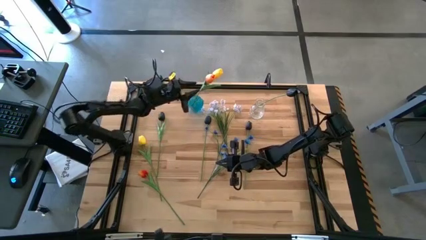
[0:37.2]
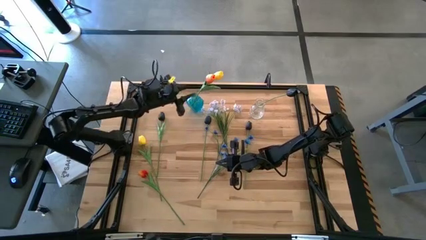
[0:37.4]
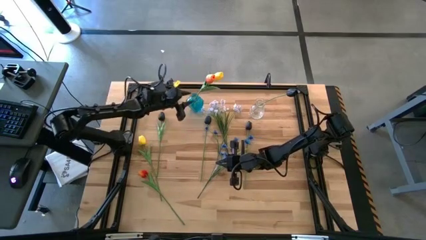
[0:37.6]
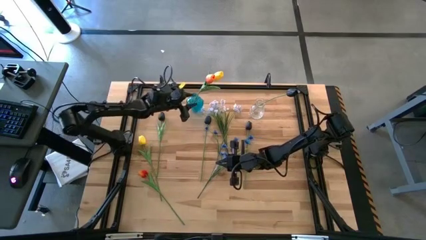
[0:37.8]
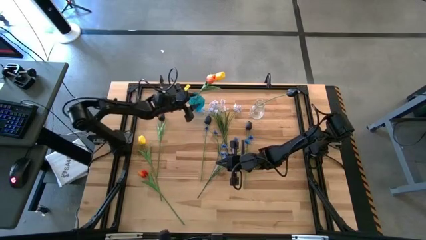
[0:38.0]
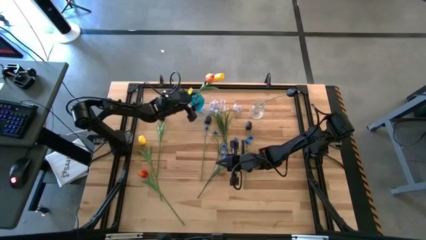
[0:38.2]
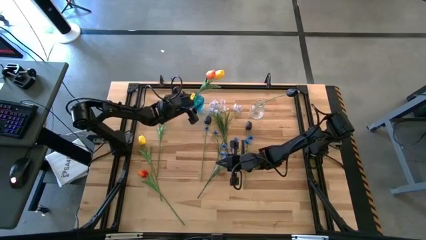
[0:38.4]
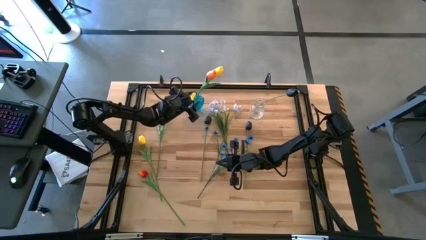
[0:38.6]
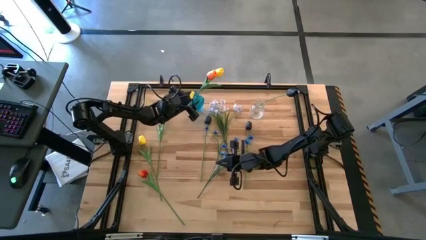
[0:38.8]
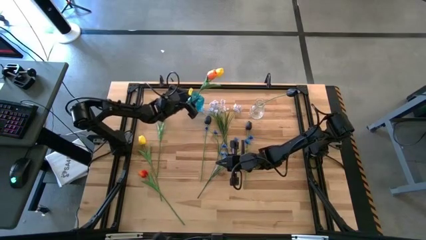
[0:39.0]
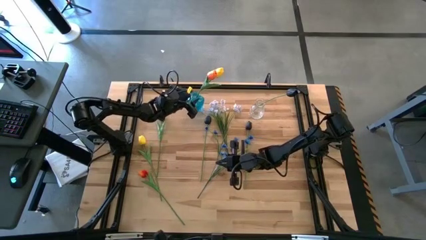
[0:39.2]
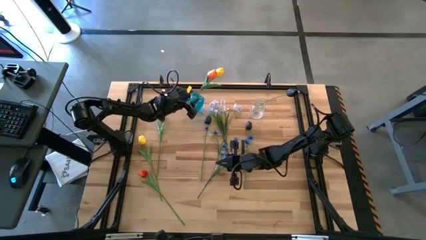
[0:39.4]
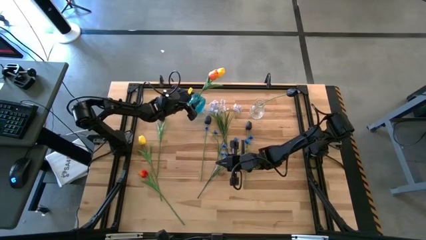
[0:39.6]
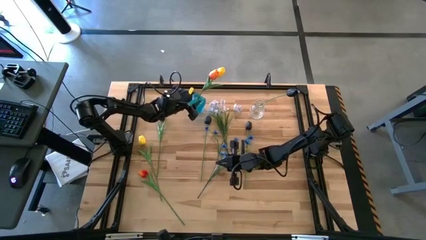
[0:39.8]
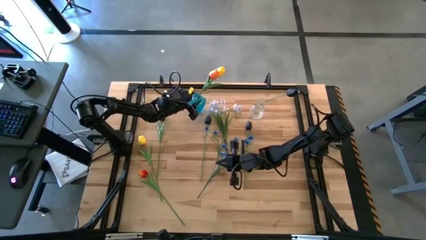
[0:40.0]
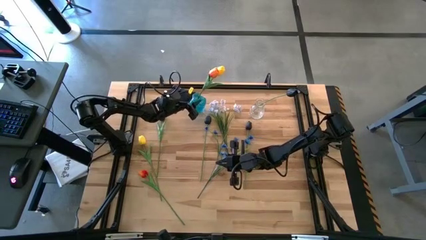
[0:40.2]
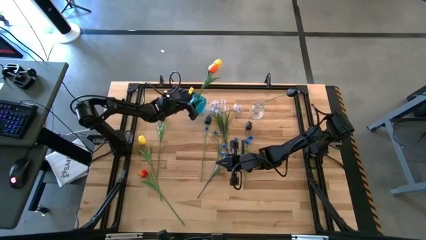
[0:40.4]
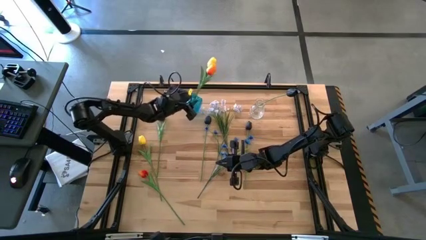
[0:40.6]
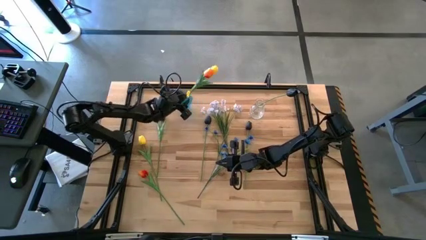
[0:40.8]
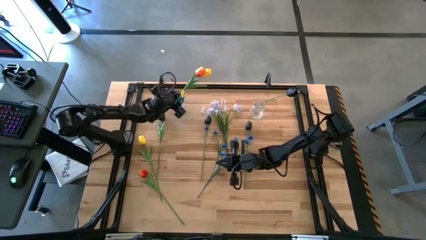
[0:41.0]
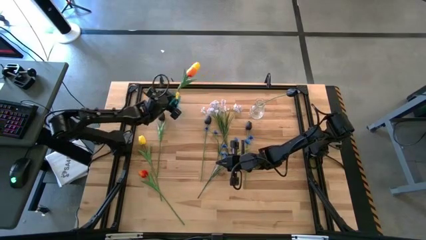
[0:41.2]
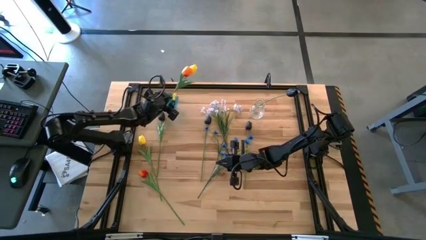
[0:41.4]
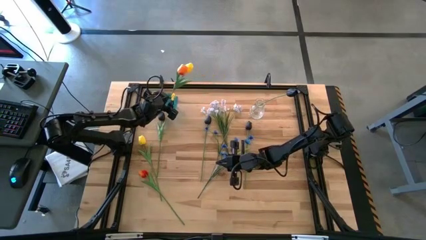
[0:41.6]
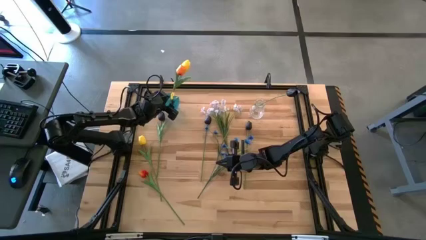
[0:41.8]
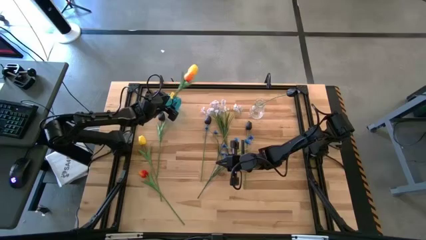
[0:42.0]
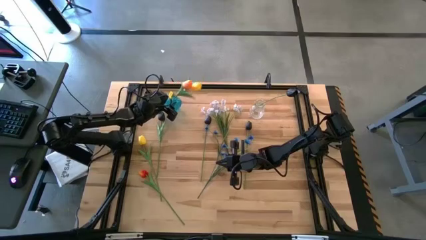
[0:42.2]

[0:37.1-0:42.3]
Task: Sort flowers into vase by color
Adjust the blue vase

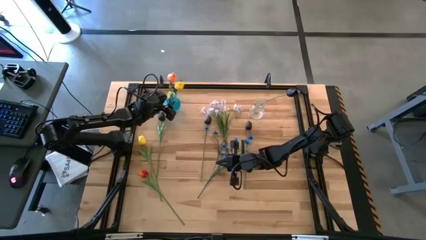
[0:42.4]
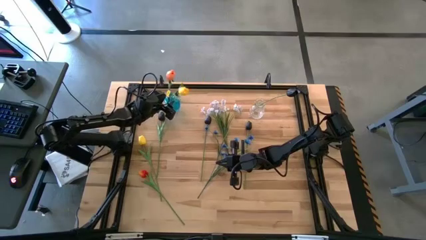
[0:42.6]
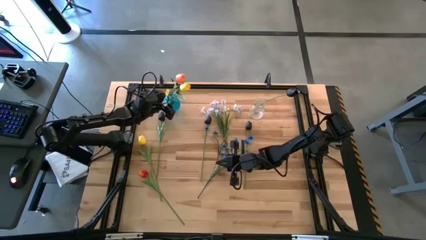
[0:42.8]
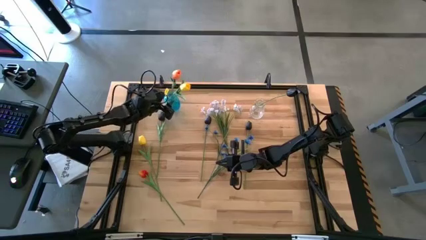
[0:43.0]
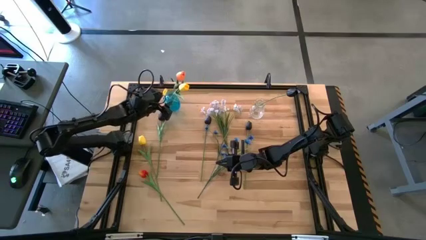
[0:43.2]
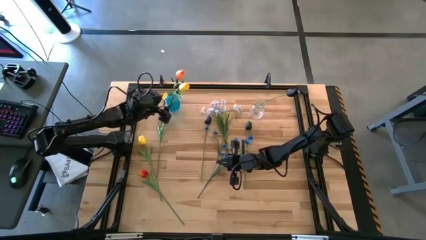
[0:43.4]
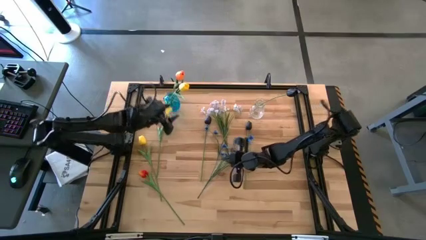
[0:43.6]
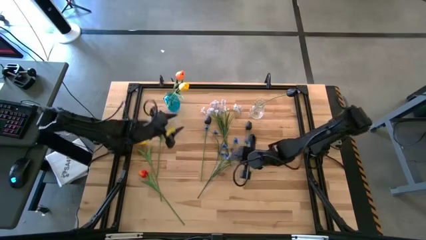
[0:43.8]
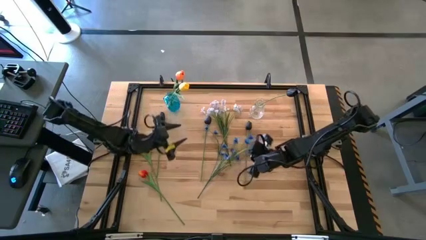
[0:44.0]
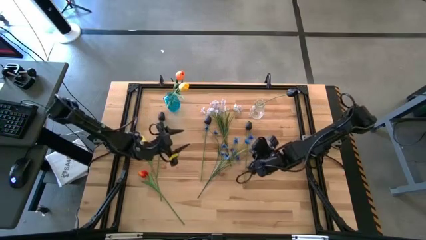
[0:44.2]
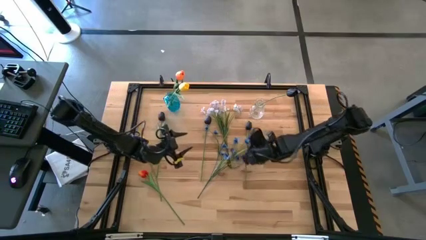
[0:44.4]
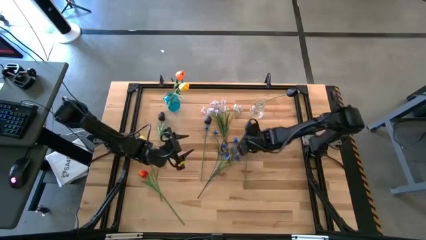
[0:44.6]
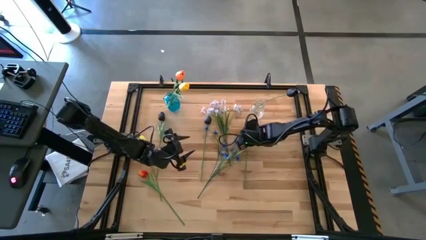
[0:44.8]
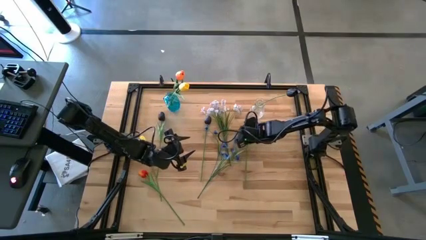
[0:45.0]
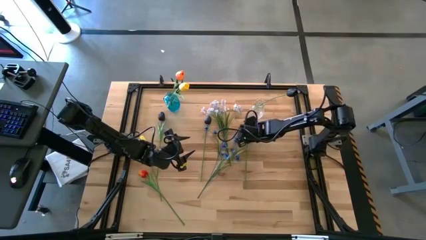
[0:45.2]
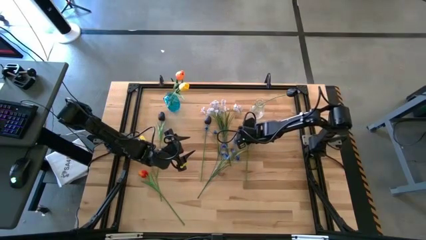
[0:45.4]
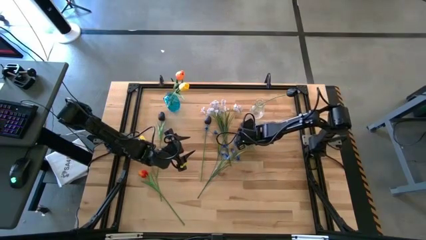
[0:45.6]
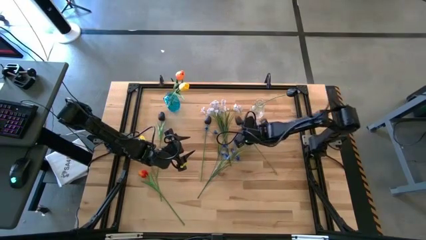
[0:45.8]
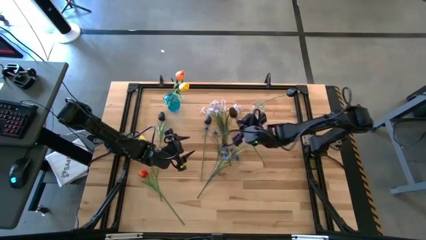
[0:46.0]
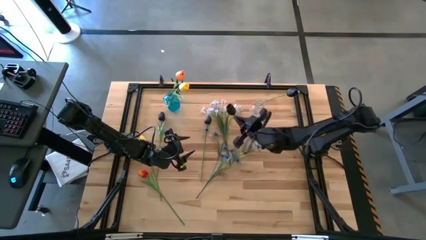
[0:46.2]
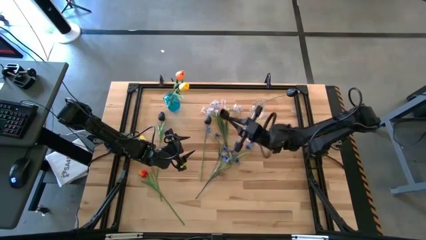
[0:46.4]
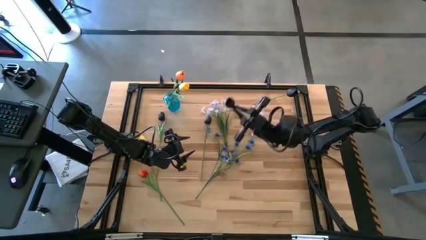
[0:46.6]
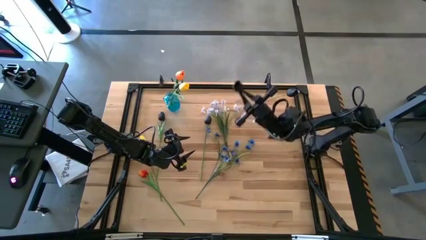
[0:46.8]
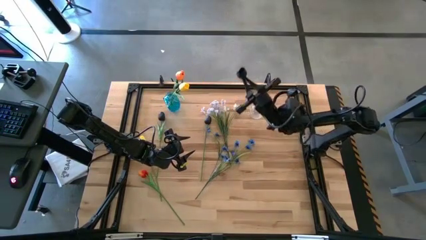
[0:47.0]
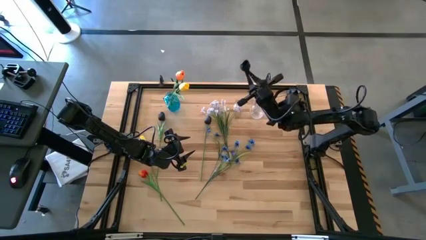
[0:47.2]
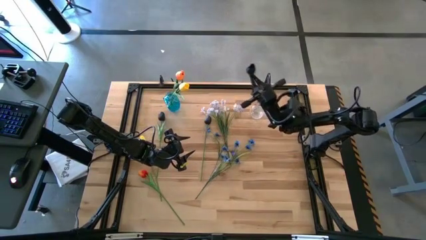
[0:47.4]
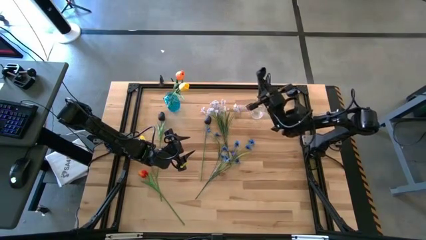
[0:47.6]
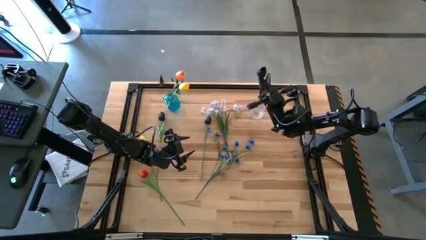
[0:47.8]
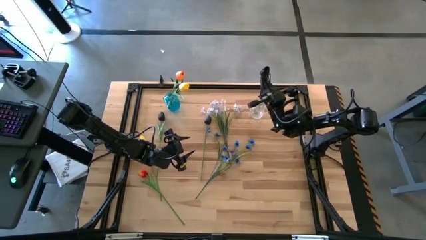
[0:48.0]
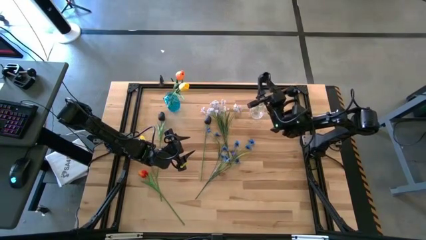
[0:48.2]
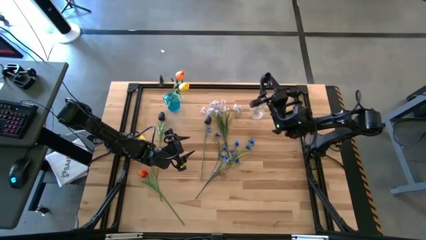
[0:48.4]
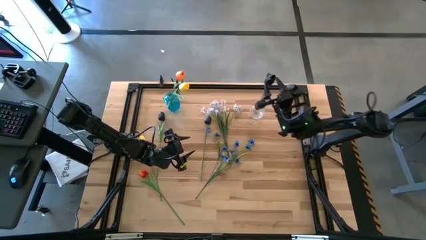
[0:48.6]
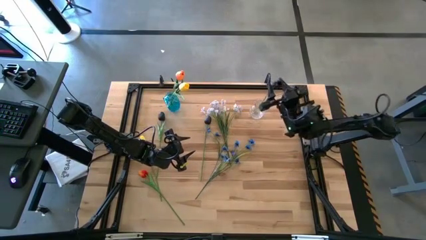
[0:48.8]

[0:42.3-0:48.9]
Put the black flower into the transparent vase

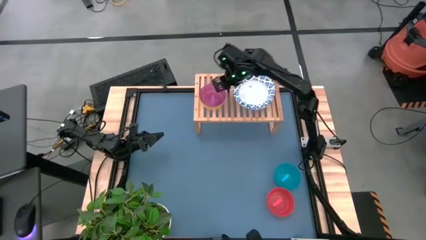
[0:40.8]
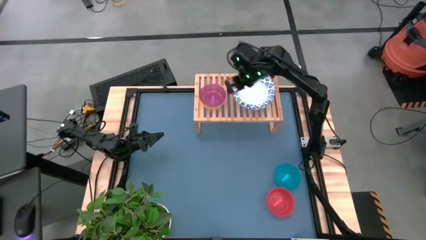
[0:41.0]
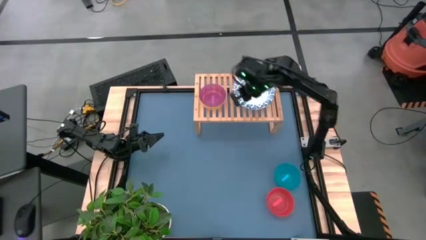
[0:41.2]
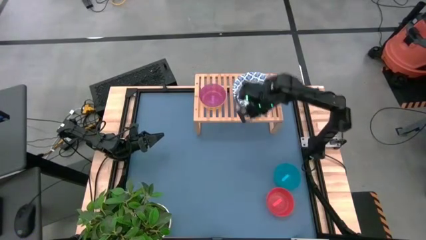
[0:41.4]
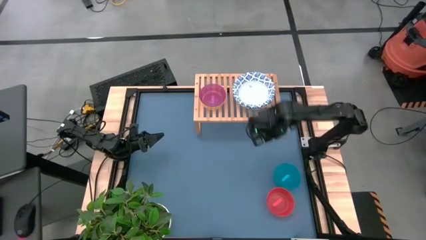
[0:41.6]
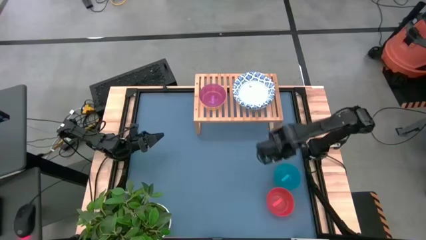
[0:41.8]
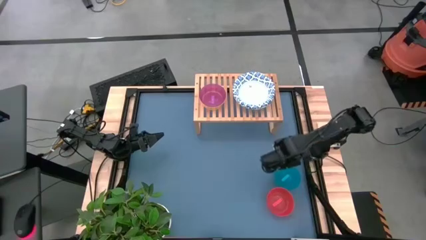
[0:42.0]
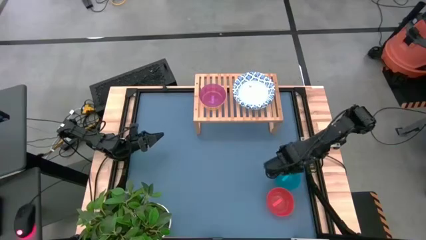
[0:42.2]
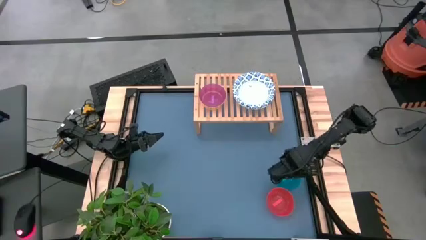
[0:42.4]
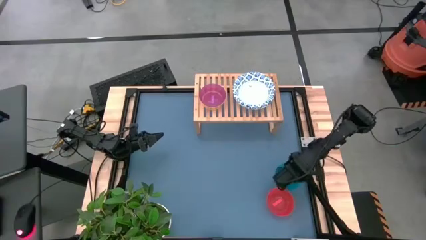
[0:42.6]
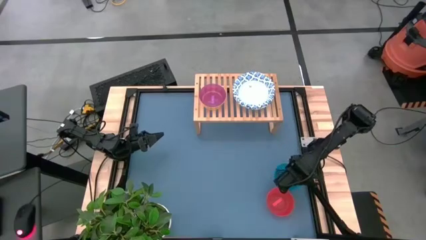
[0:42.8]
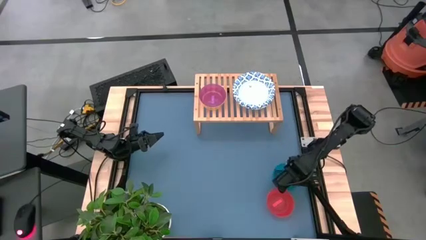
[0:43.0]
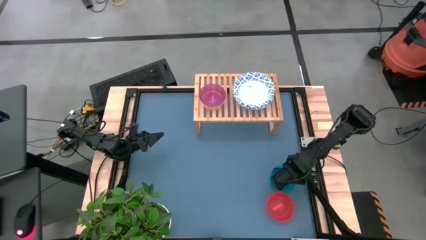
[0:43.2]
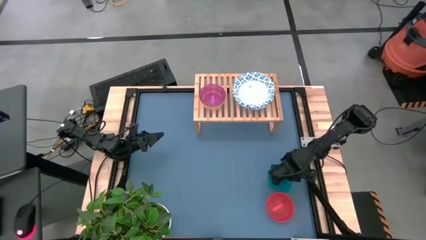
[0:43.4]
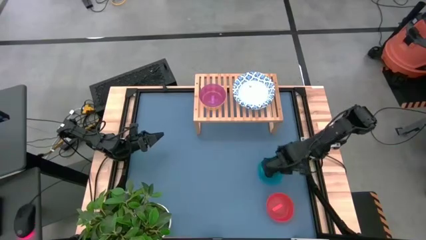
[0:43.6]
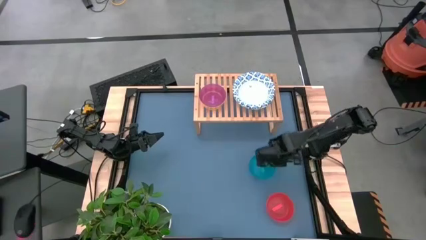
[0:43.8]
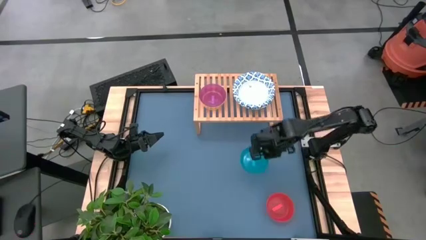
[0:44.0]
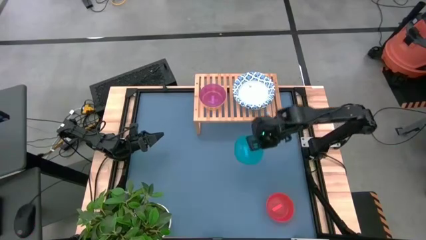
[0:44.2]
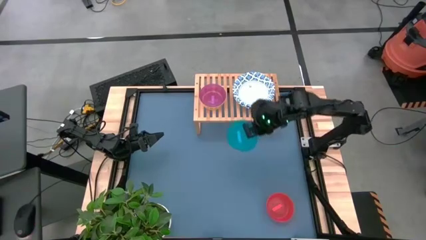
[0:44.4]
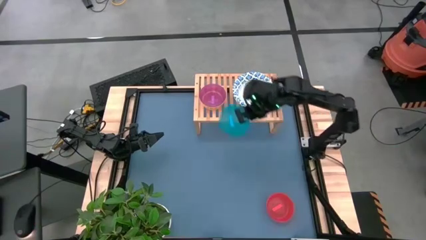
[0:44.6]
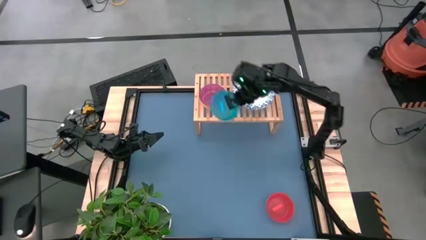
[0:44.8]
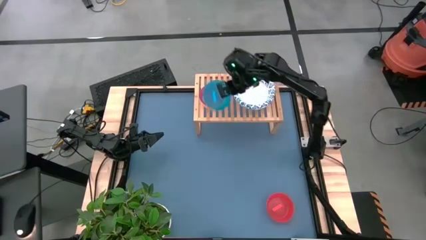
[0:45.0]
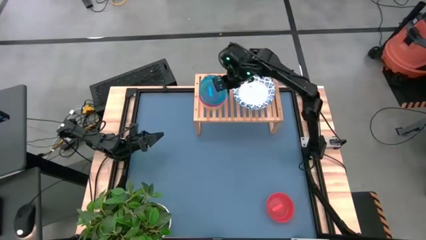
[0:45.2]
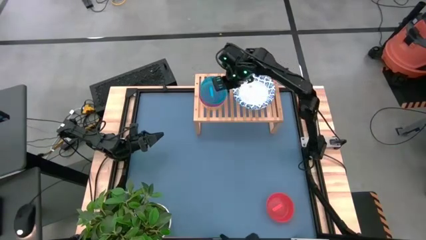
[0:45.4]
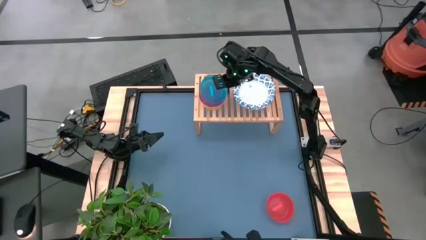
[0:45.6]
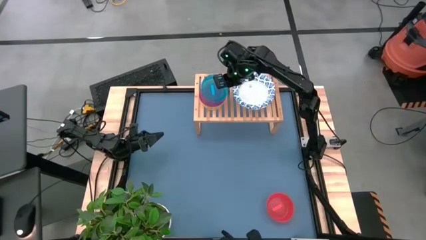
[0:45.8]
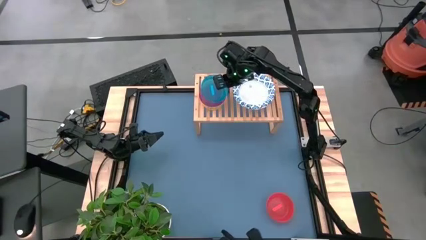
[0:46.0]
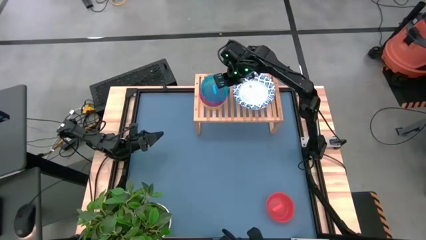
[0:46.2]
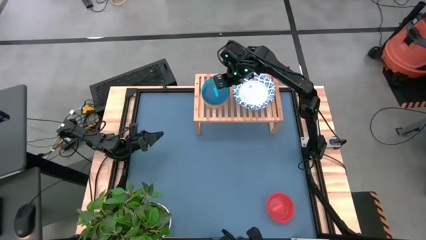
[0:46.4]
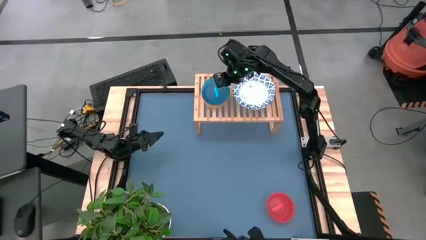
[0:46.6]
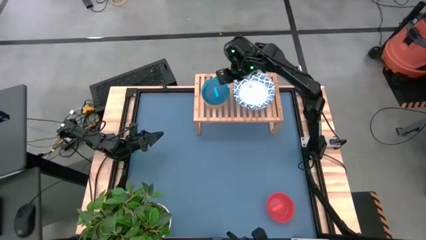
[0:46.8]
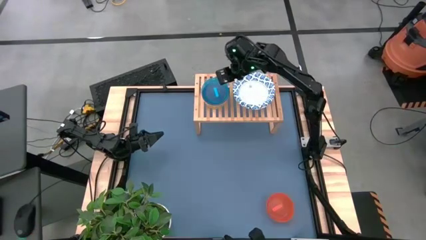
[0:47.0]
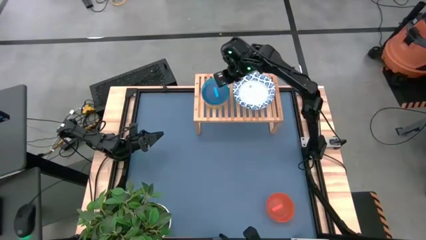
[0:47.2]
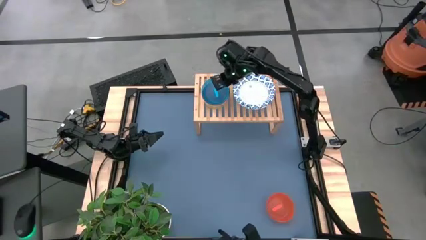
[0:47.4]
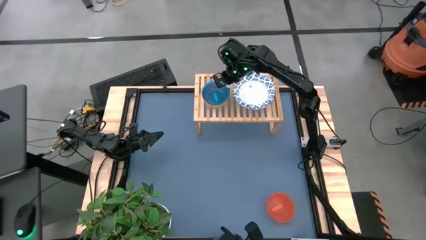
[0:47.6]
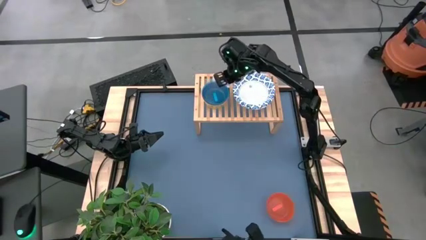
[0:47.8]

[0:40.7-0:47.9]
Task: Place and stack bowls onto a shelf
Stack the blue bowl on top of the purple bowl on the shelf
